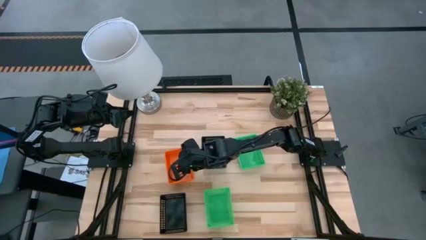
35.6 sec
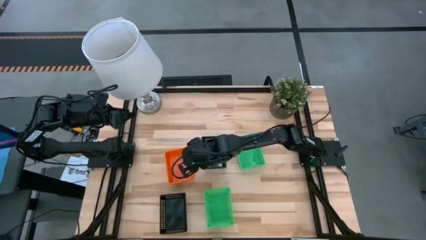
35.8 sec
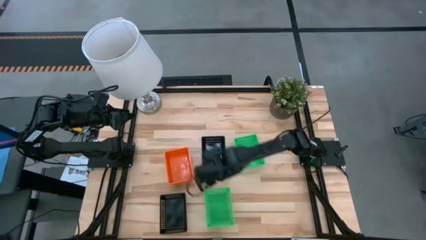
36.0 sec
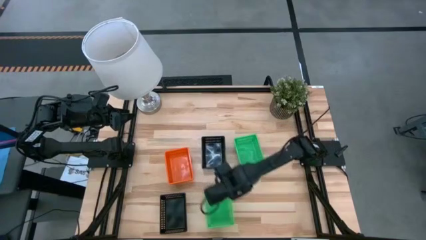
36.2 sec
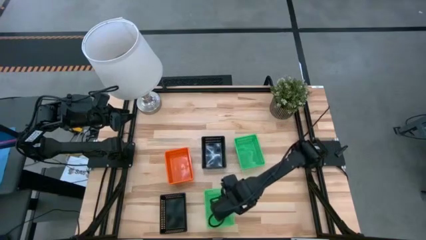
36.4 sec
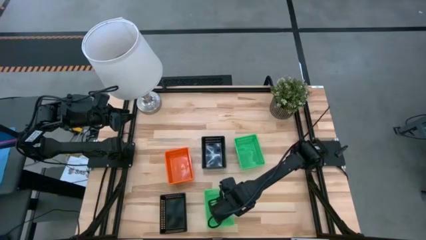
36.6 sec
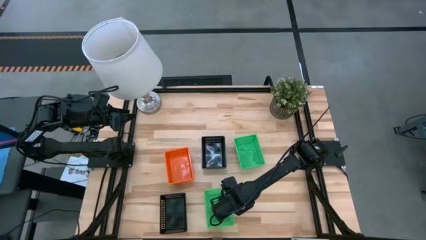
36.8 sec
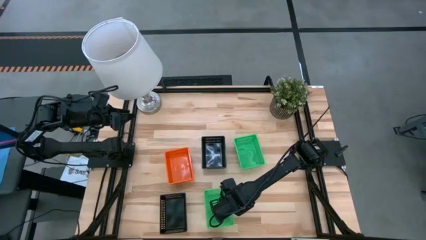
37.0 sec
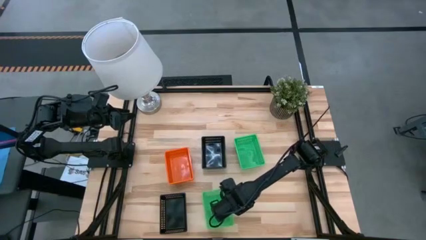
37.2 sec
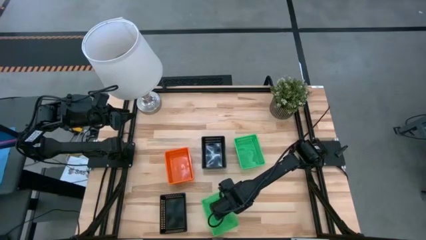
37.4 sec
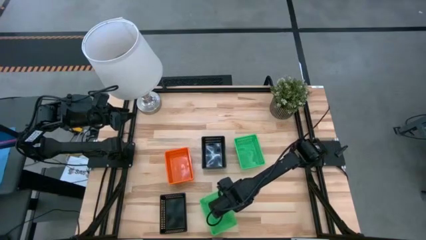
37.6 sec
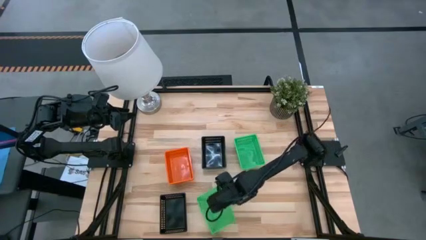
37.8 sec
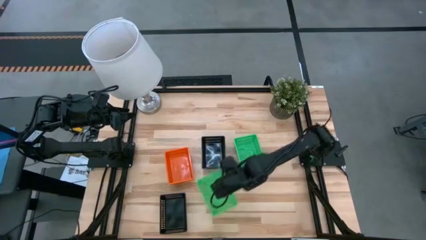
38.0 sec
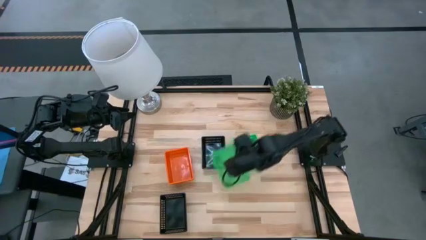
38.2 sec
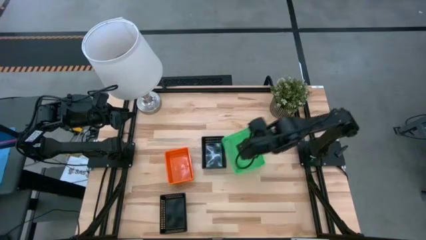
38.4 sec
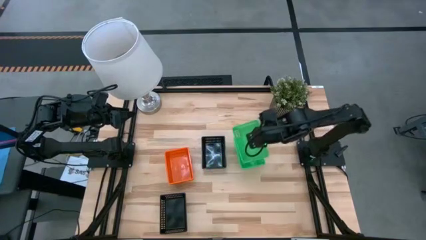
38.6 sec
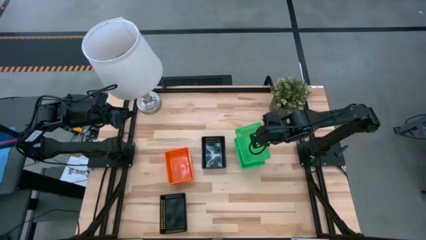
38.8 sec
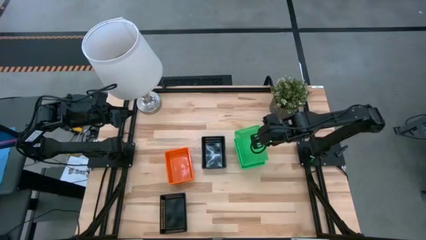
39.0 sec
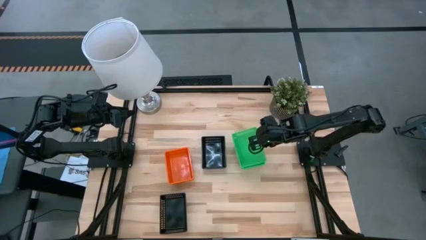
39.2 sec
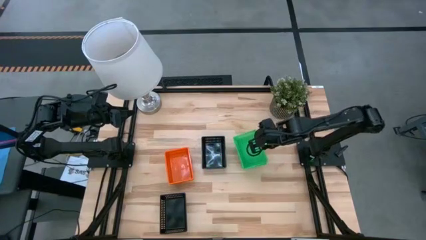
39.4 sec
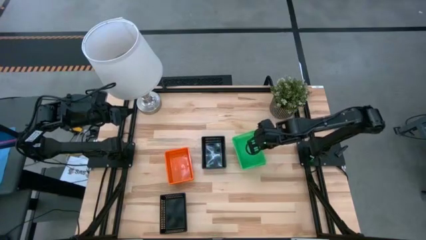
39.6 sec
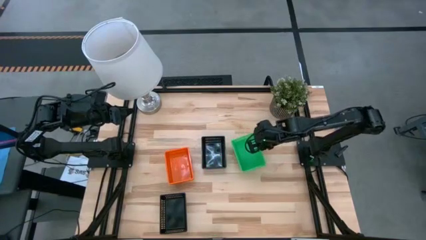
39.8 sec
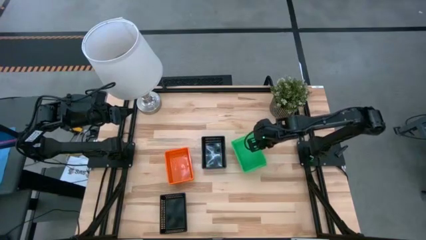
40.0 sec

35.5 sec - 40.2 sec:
Stack the bottom green bin on the green bins

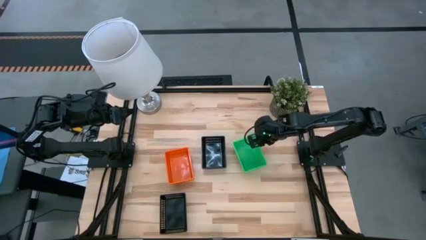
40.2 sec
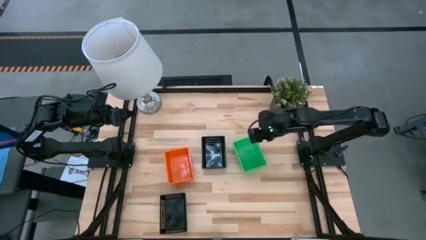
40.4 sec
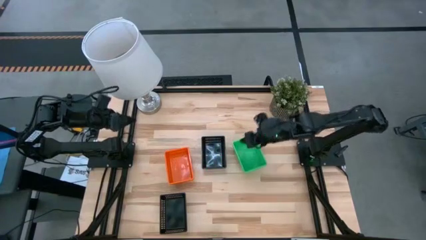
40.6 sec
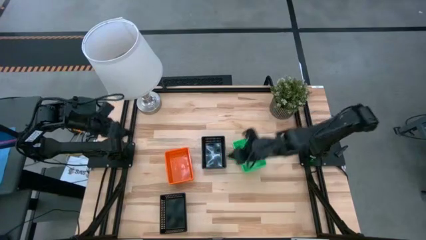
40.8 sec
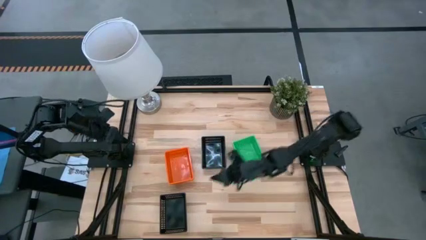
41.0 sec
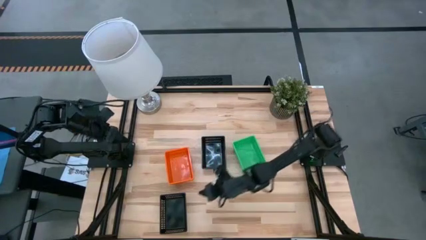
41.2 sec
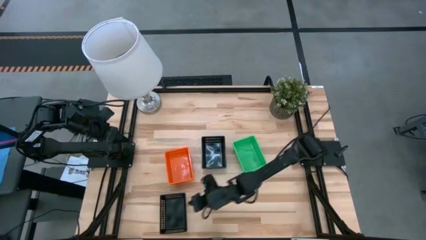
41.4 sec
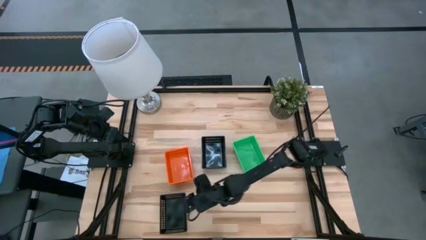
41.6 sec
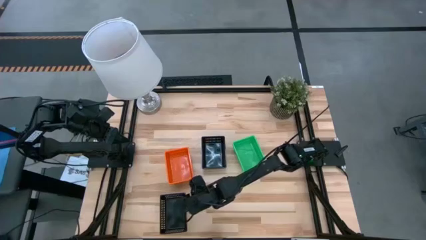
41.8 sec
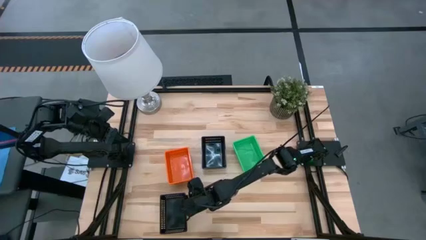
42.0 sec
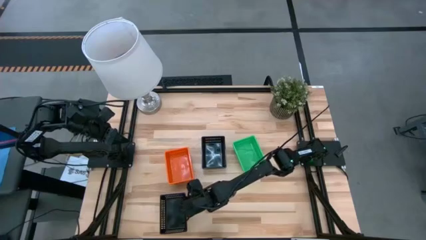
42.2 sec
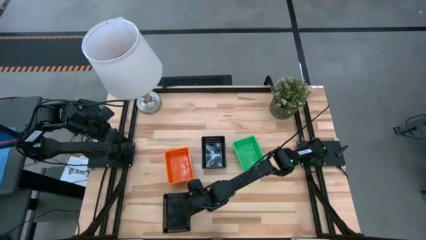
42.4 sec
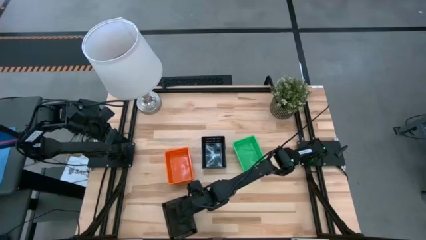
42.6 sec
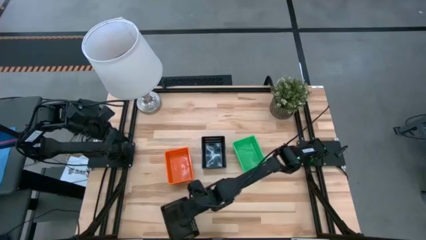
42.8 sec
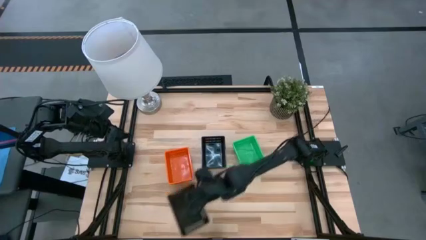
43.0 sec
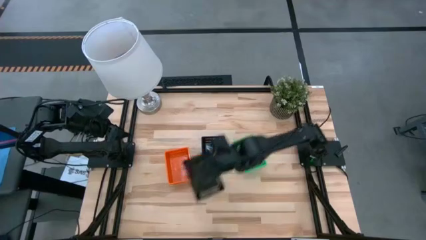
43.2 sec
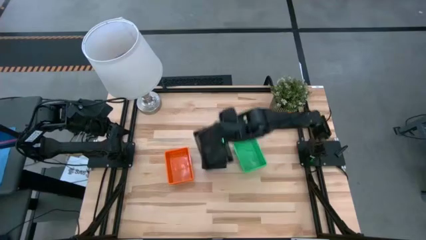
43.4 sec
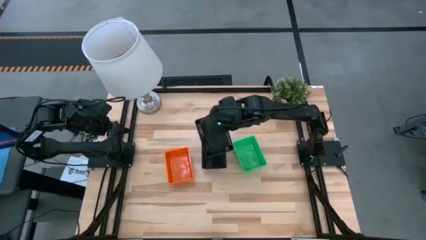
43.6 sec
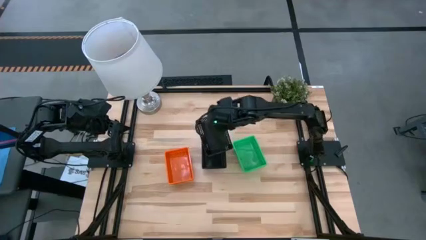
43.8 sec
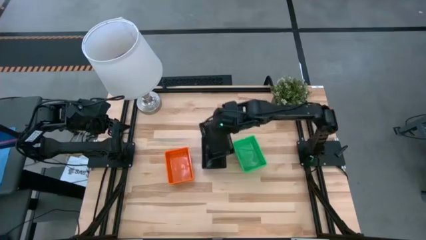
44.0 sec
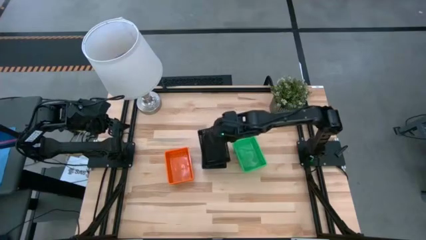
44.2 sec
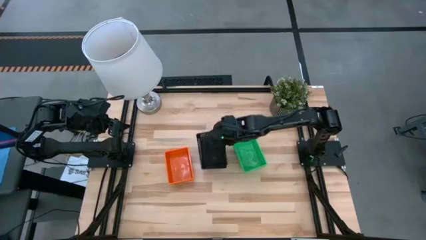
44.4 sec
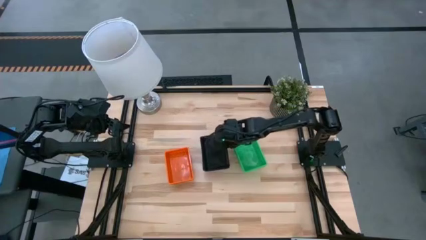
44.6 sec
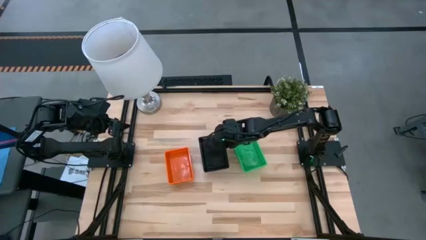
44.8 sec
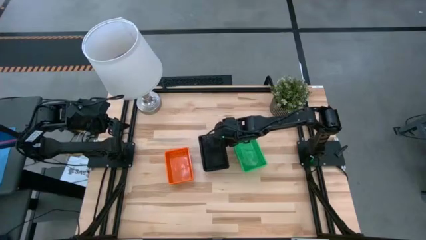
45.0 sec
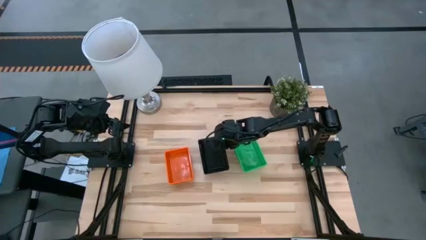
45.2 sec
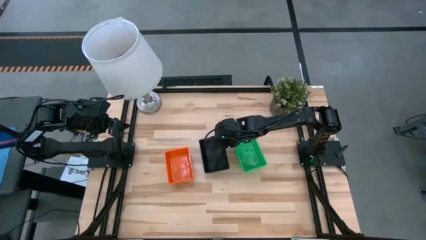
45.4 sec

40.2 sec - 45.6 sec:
Stack the bottom black bin on the black bins

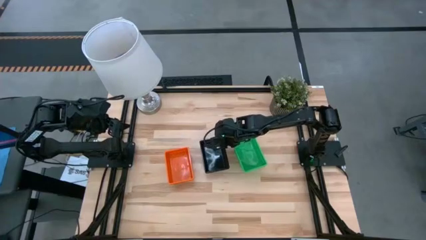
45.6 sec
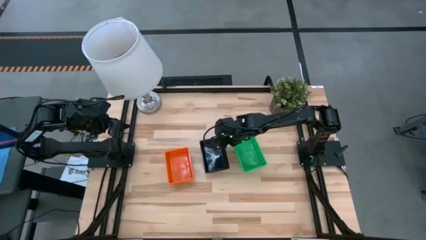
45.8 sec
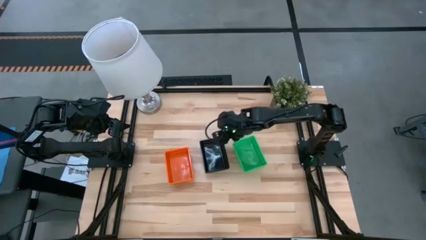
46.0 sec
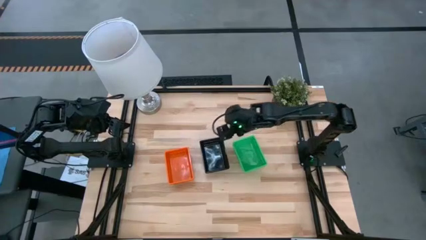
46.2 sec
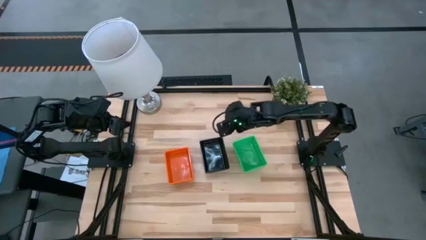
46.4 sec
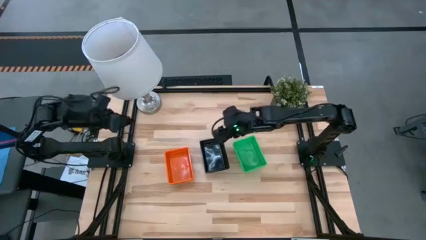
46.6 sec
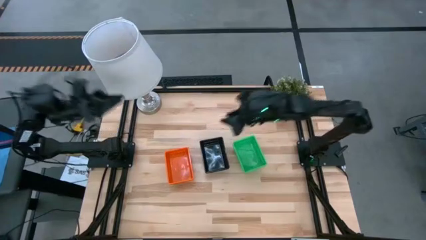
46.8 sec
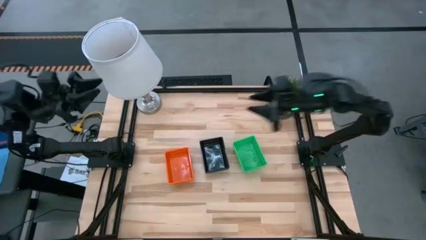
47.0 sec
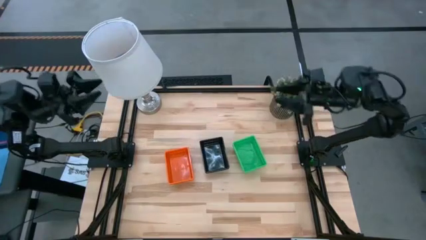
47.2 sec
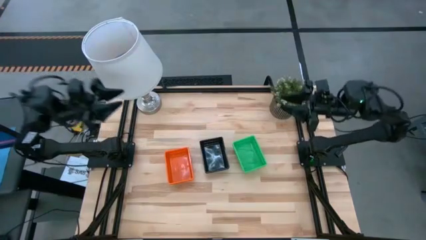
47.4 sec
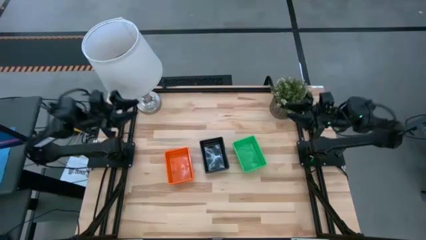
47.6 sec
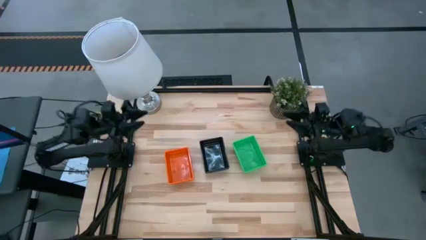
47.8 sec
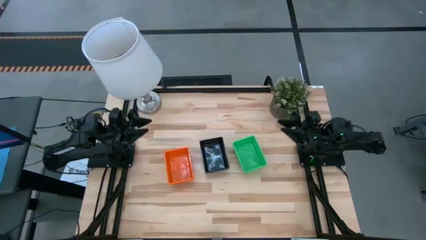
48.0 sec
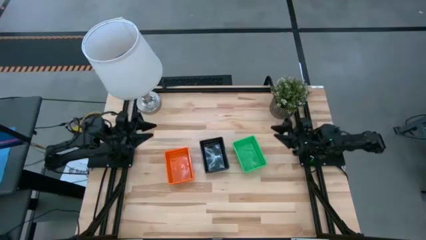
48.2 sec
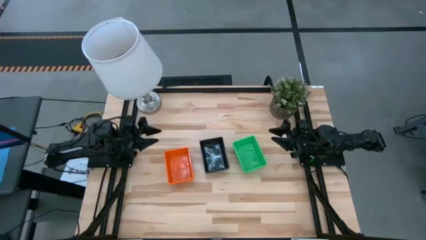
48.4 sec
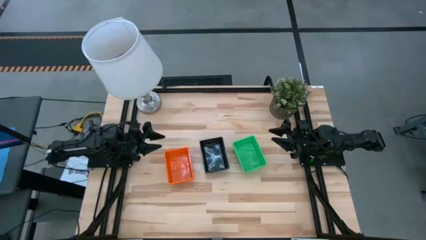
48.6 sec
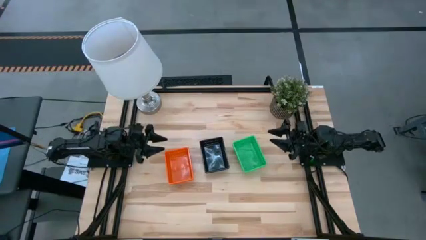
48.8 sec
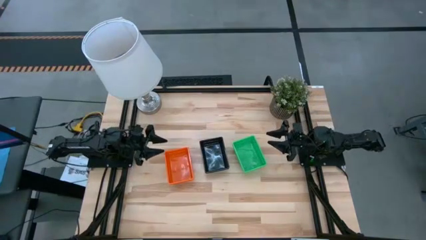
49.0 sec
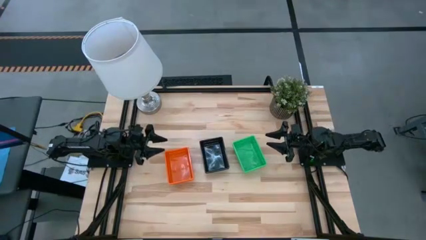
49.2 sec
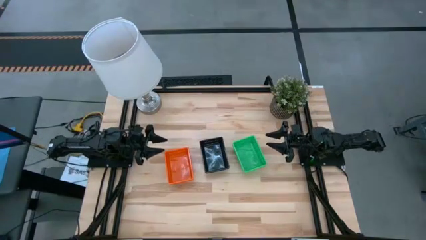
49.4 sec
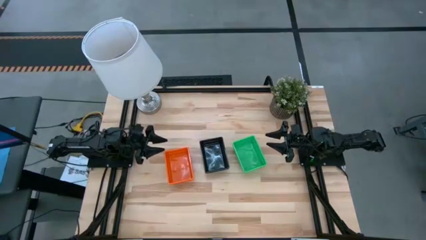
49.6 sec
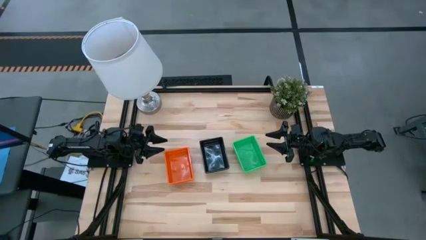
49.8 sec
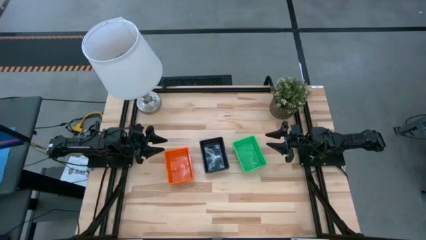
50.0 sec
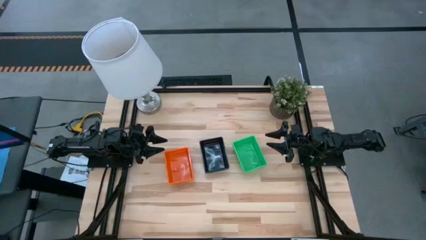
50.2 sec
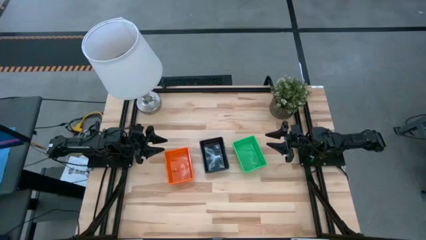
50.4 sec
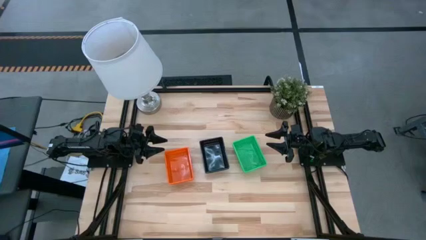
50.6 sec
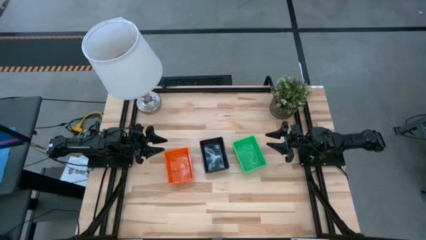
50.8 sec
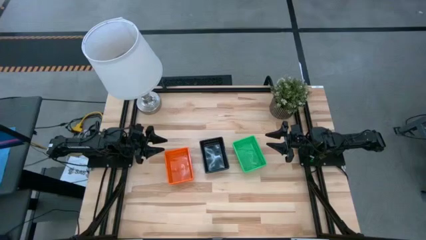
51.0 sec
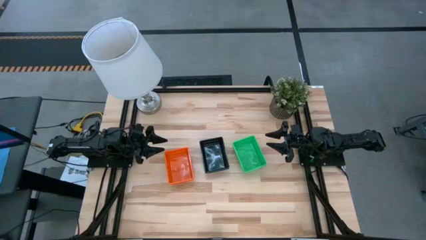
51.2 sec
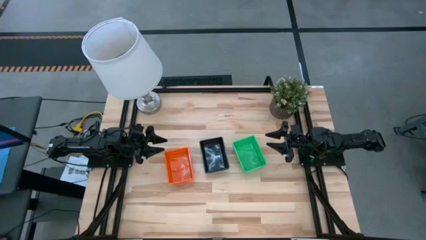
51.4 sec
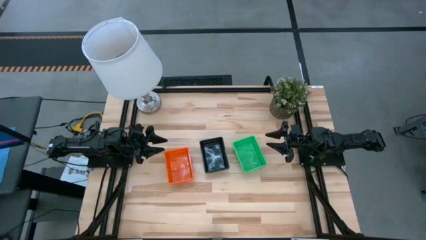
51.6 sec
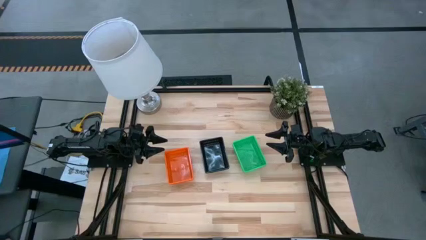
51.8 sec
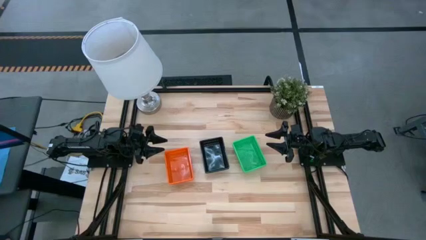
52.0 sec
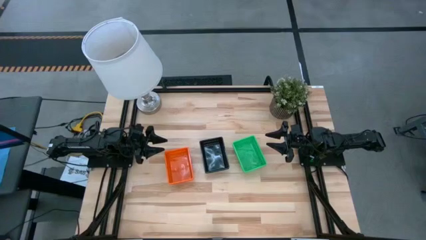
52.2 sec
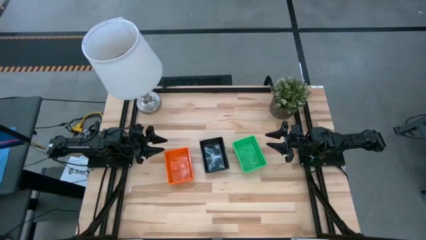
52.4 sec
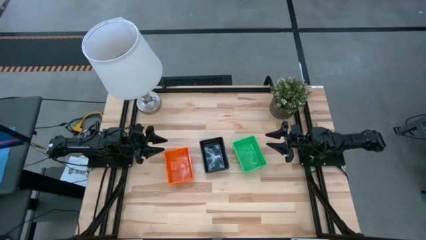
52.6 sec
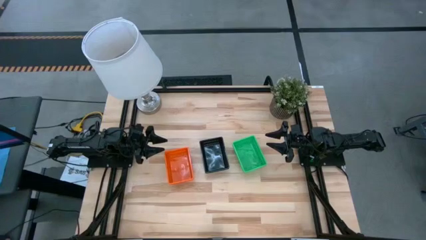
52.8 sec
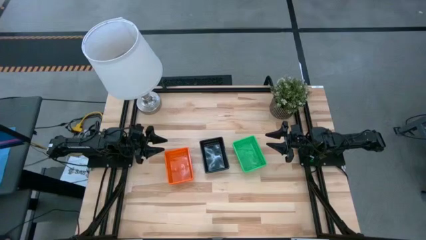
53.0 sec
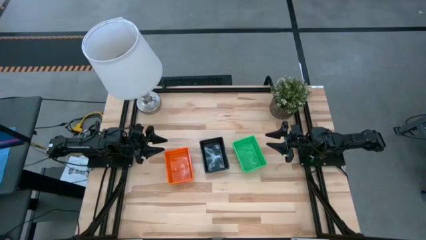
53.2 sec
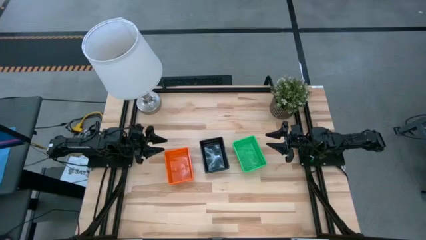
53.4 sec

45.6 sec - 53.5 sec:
Return to Home Position
